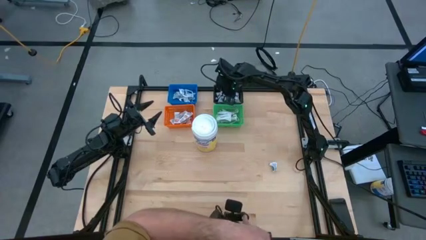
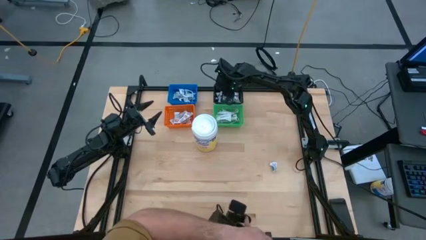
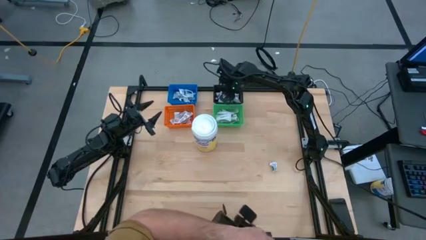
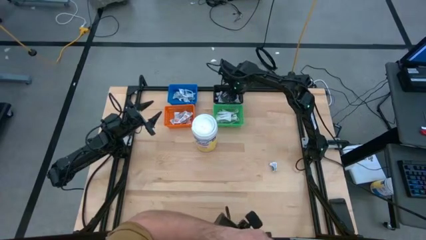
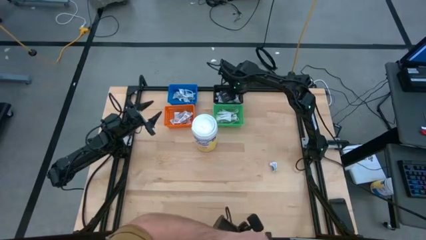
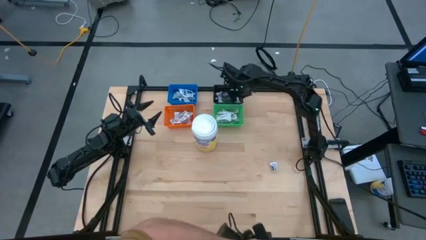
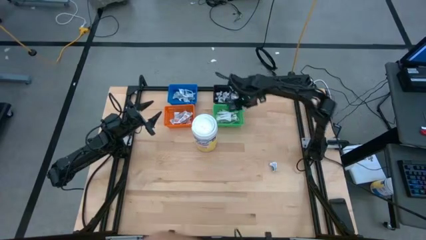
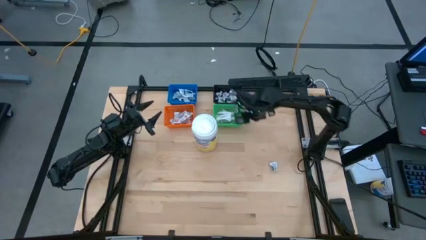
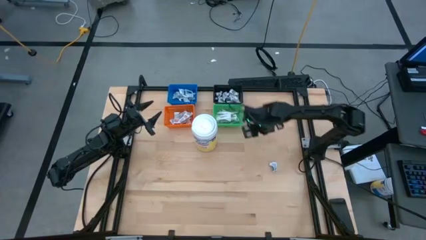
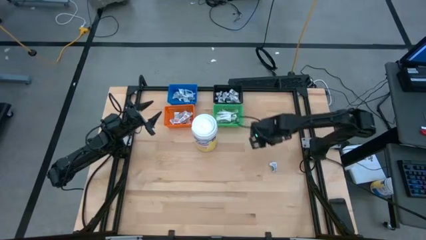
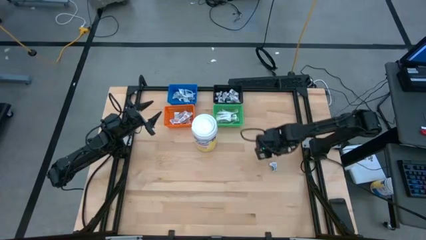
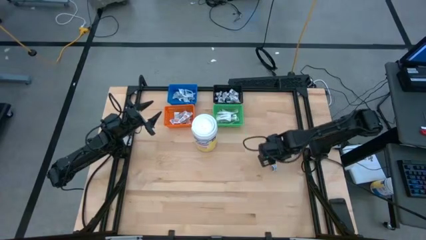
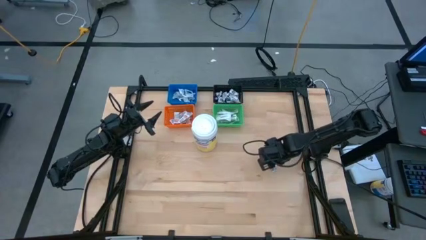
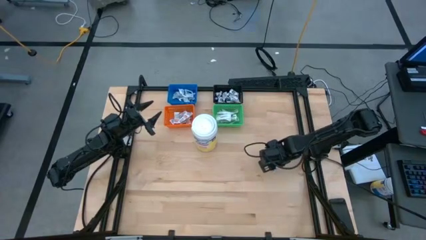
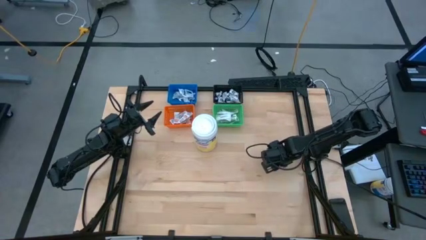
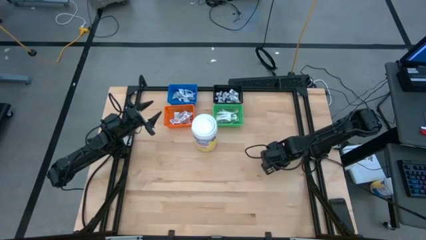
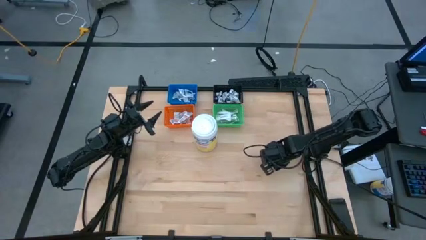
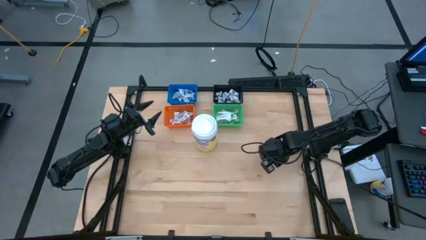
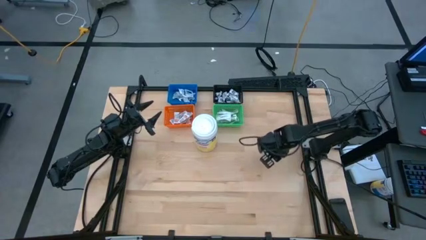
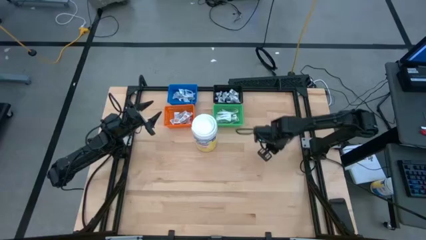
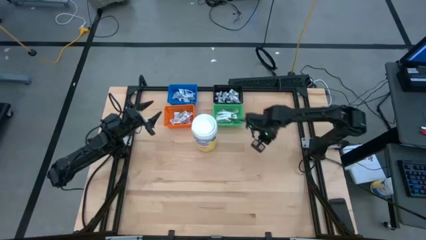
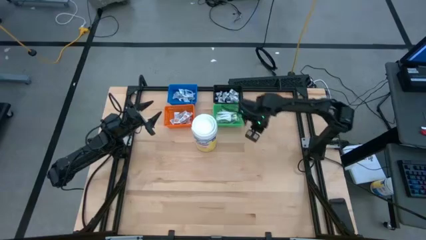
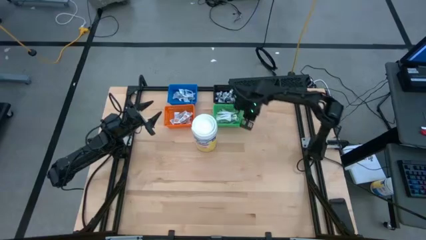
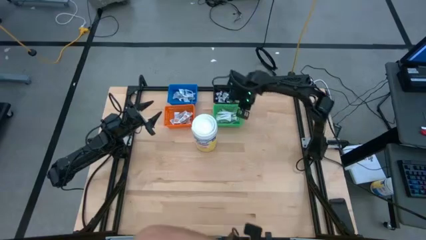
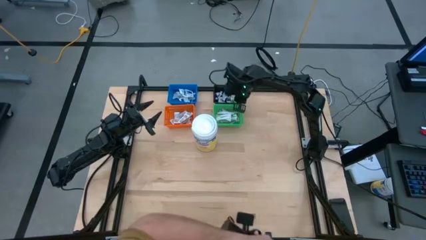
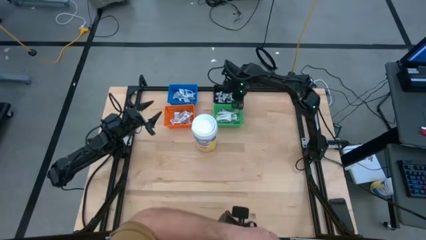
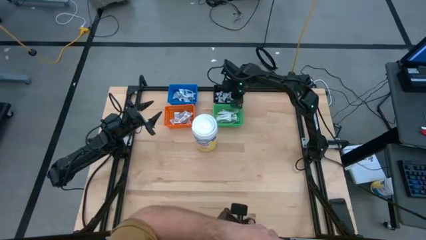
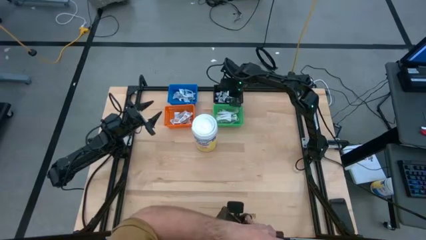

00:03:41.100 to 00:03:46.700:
Task: Pick & Place First Aid Supplies
Put the black towelette pack into the black bin

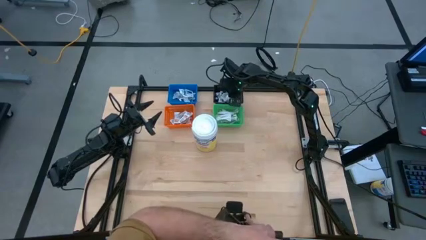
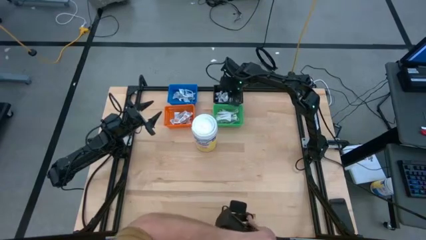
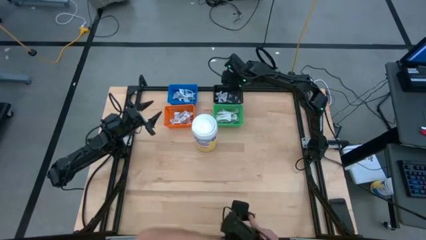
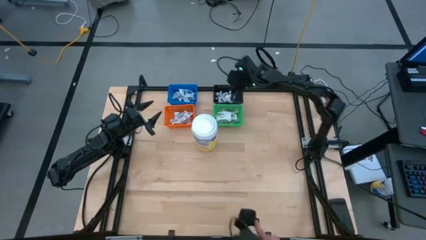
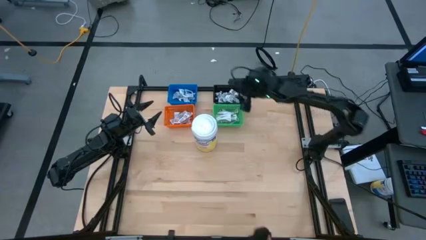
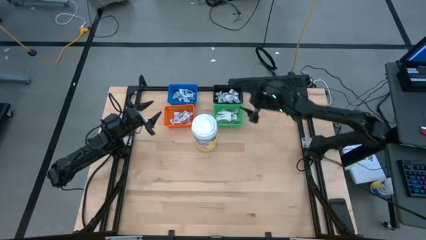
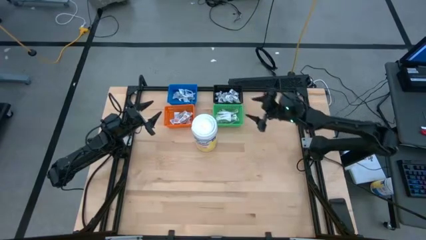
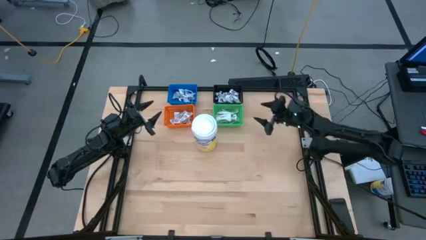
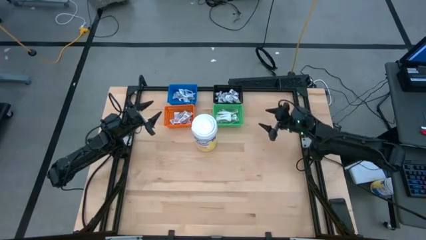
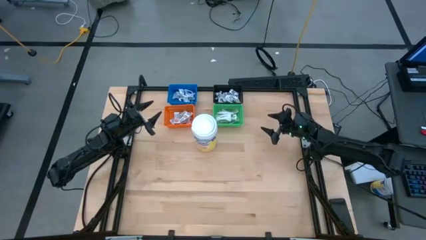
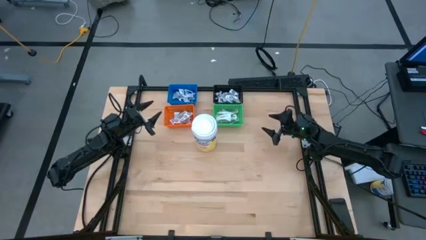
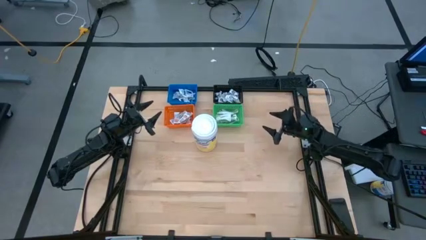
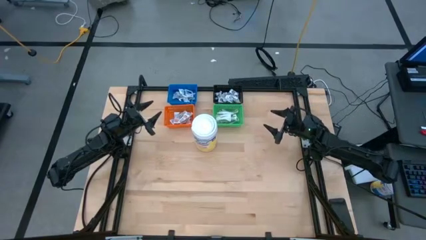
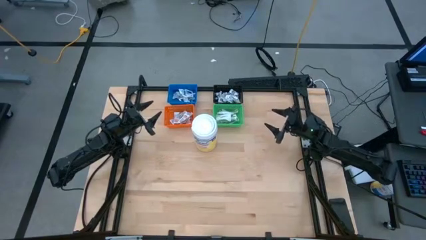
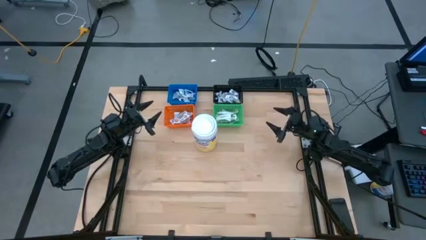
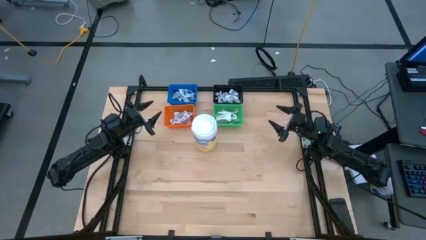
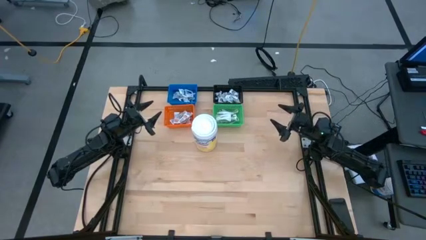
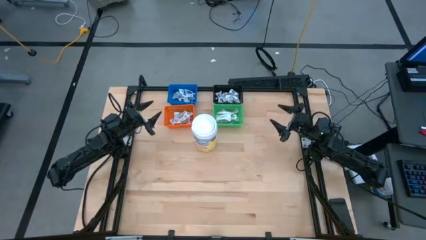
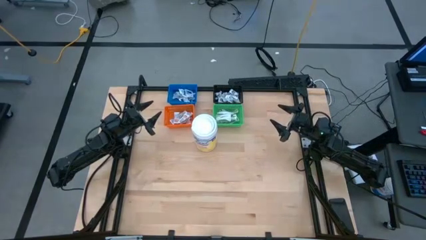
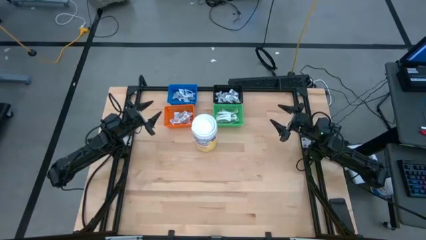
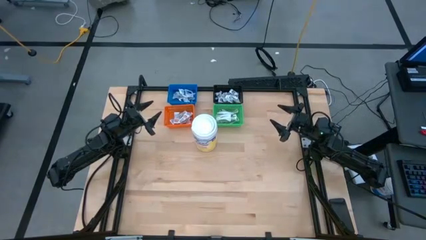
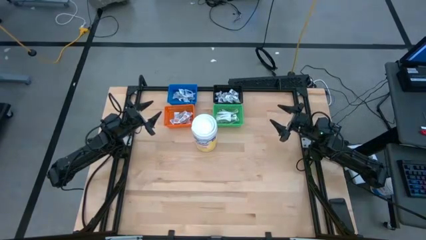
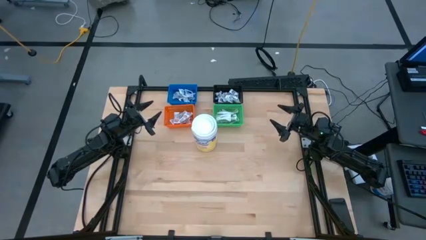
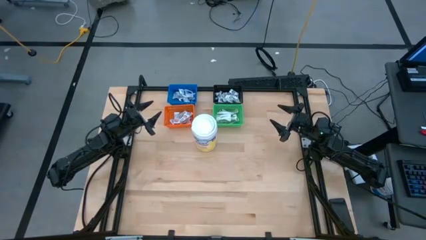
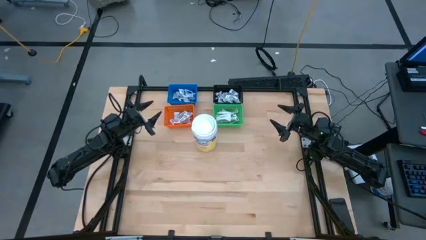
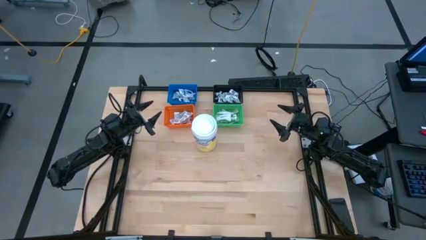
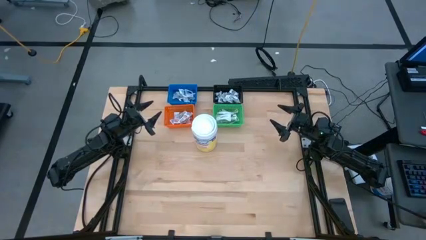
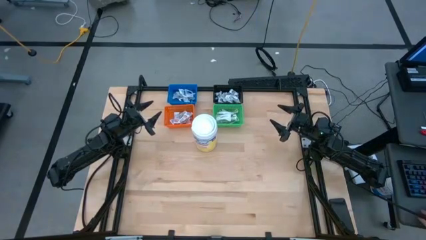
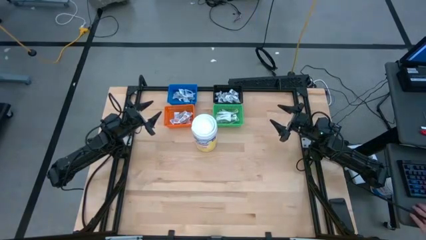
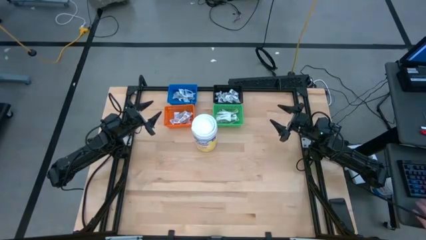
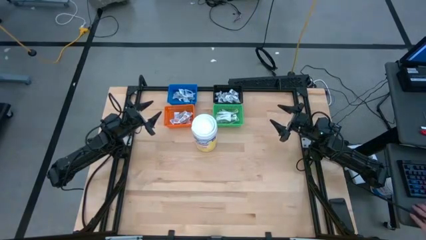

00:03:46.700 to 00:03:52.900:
Return to Home Position

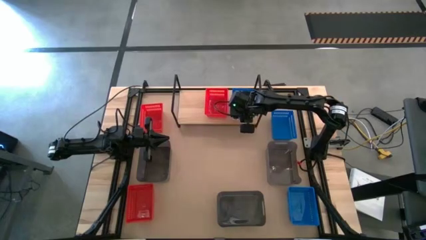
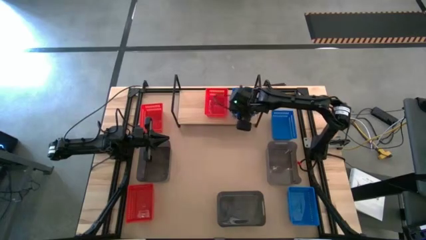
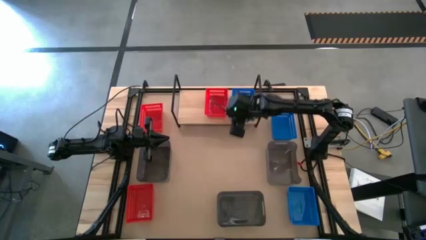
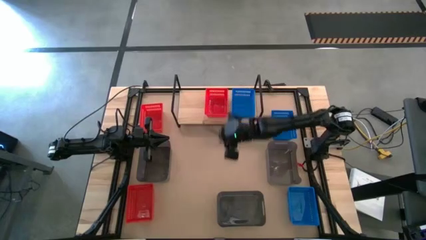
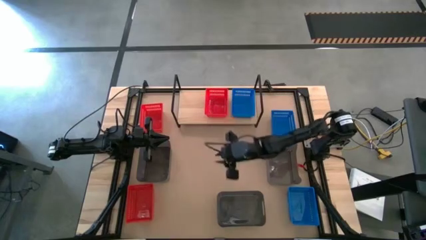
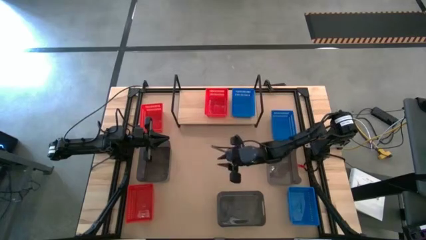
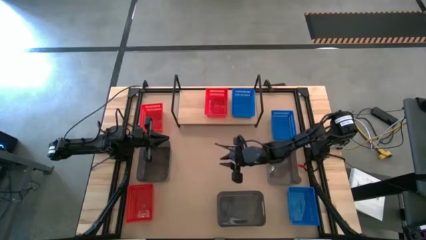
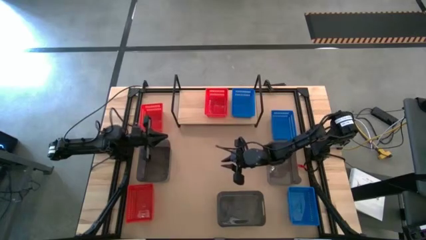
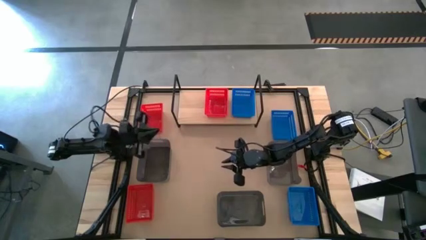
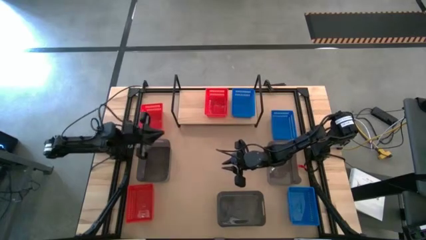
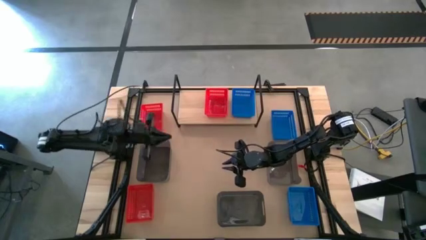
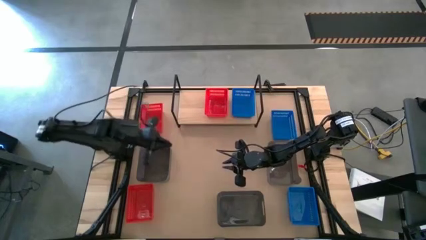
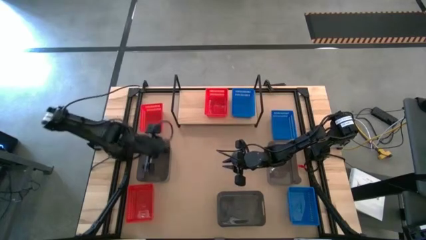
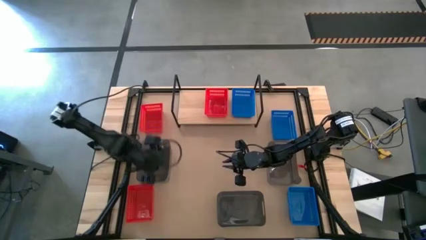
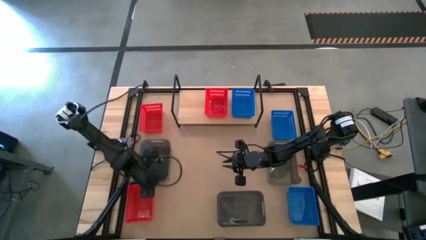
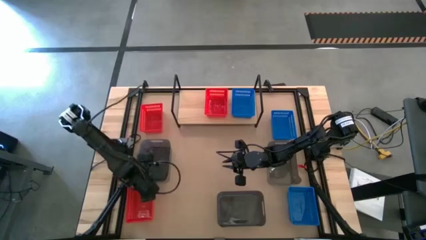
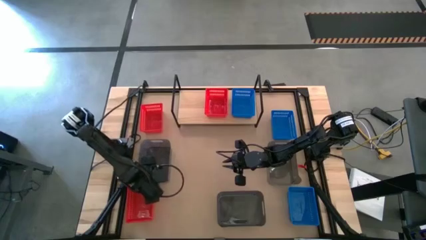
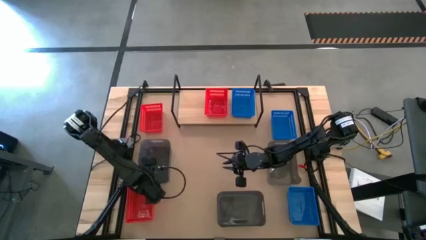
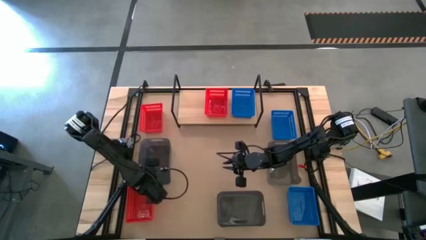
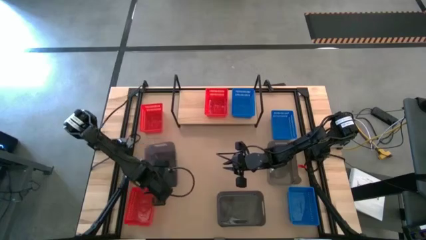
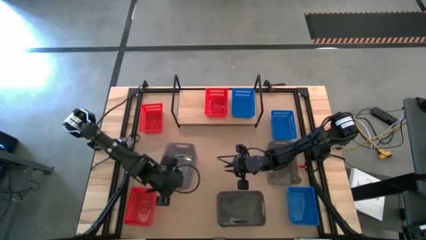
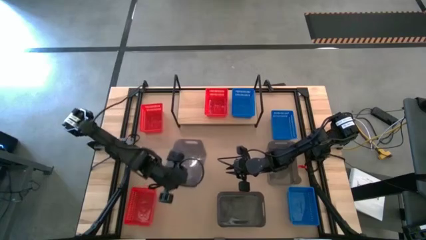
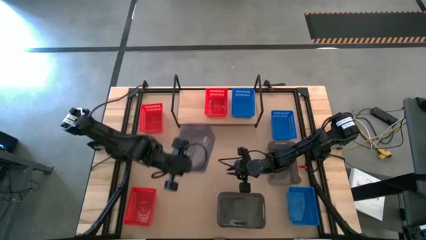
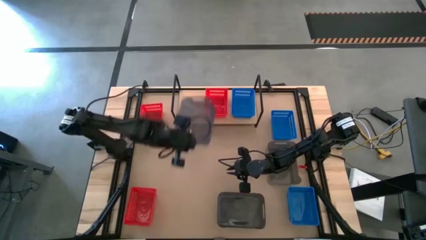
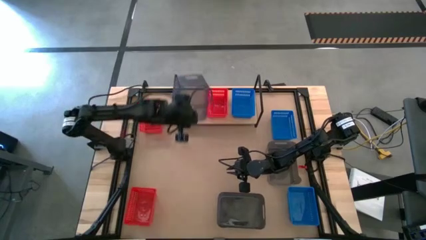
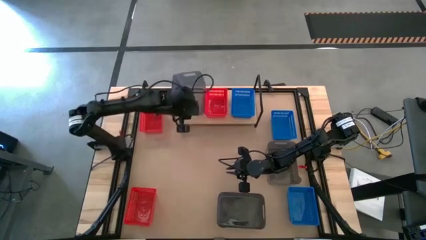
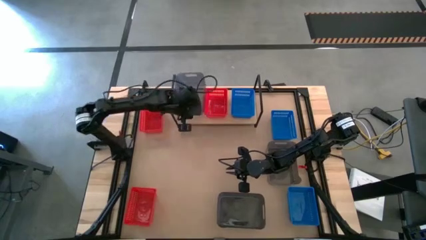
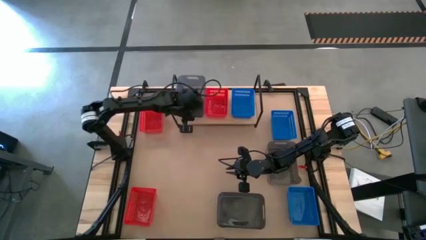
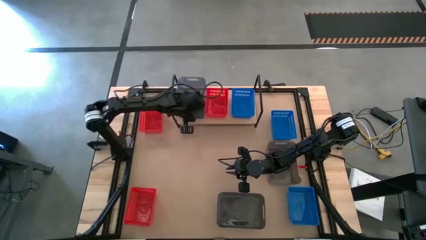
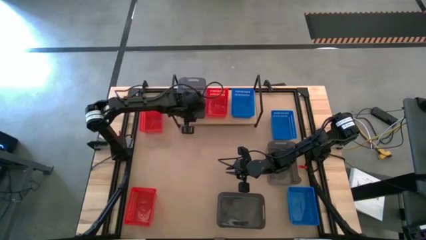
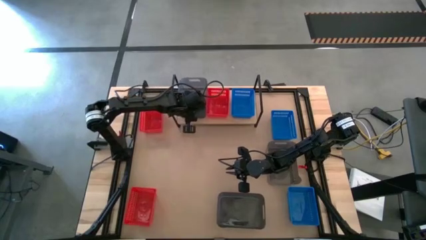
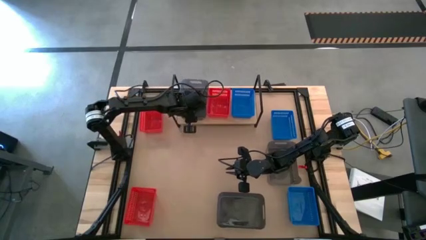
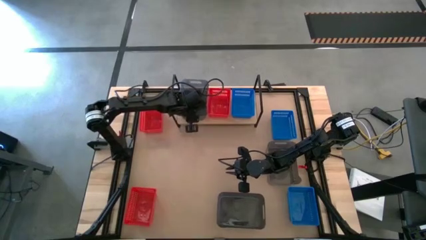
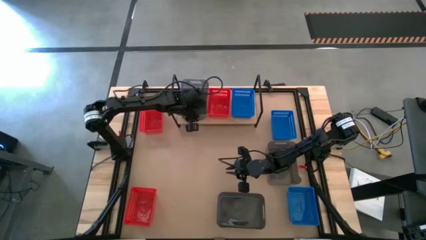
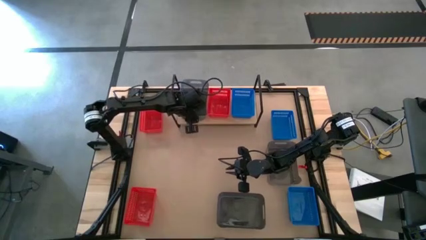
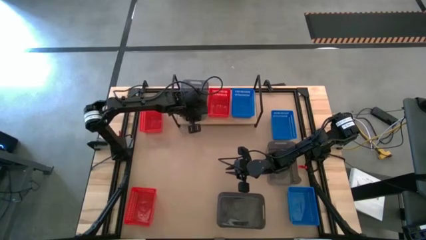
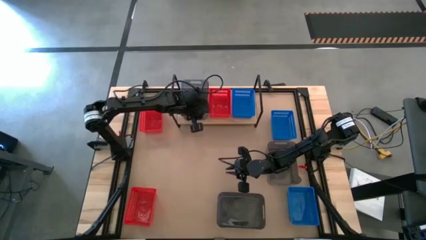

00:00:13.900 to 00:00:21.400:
Task: Stack baskets on shelf by color
Put the top left black bin on the shelf
